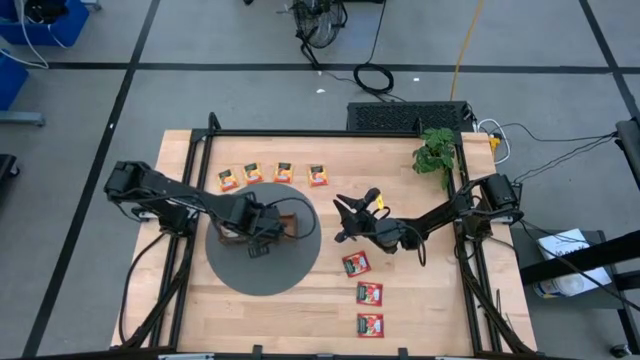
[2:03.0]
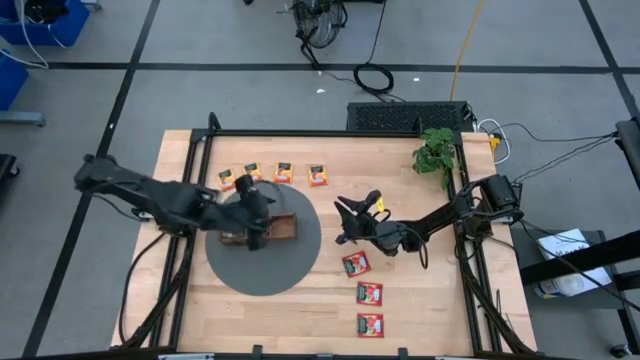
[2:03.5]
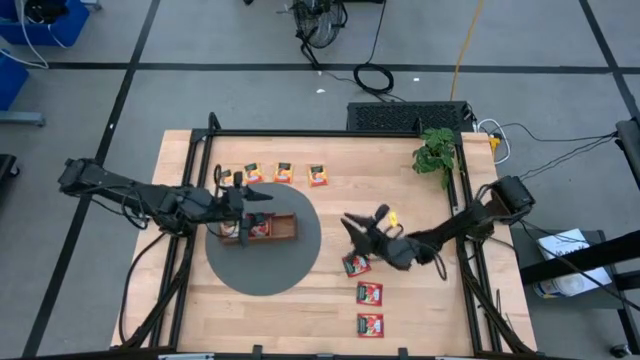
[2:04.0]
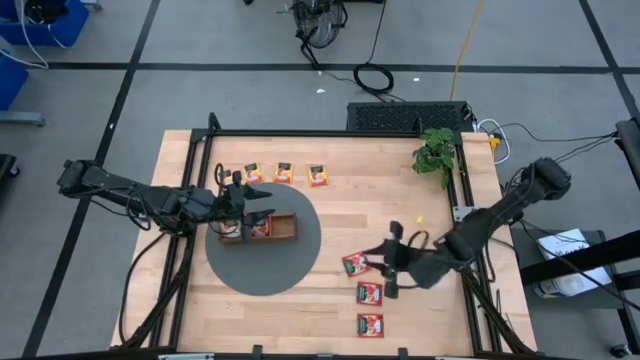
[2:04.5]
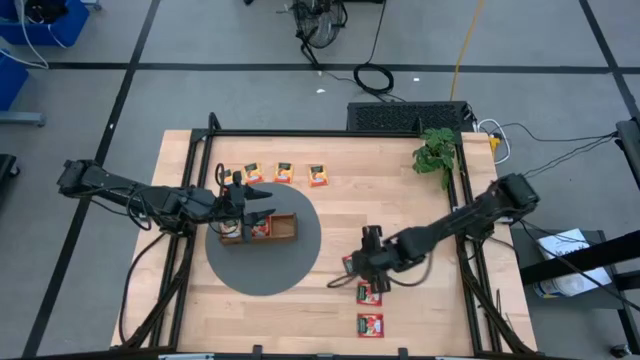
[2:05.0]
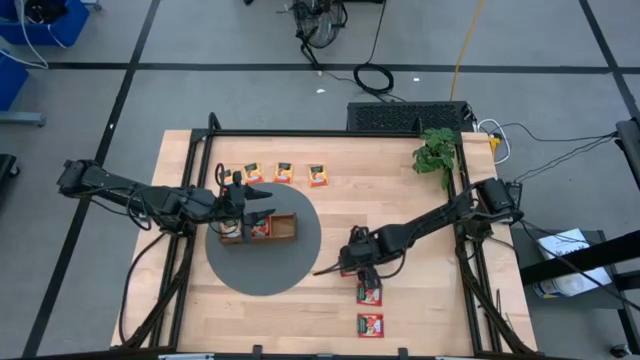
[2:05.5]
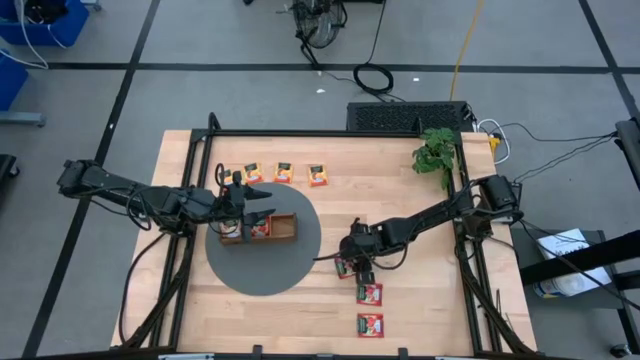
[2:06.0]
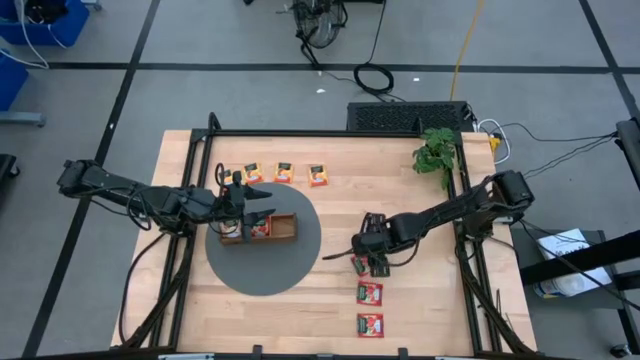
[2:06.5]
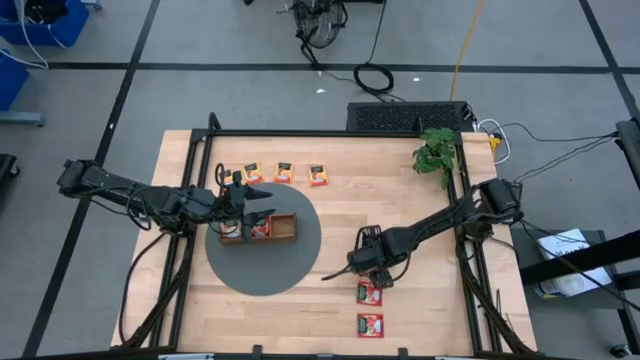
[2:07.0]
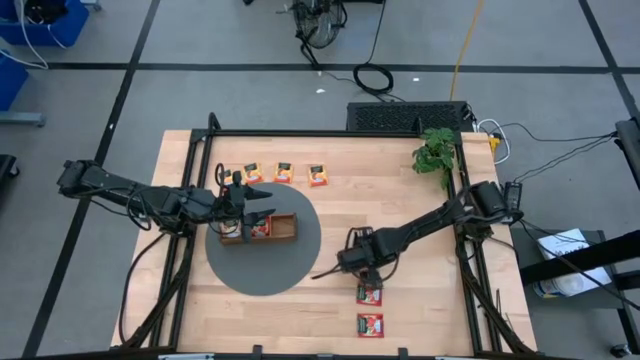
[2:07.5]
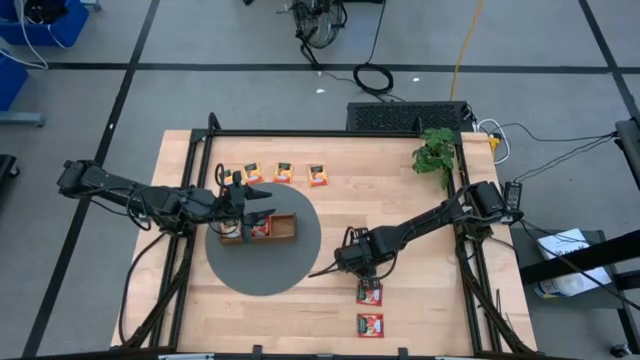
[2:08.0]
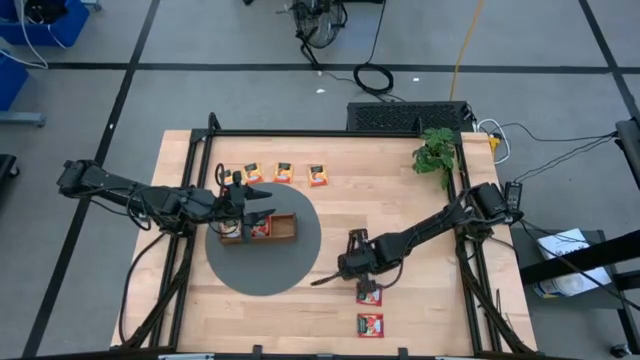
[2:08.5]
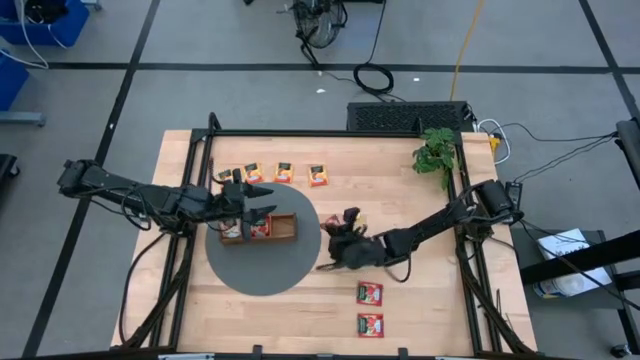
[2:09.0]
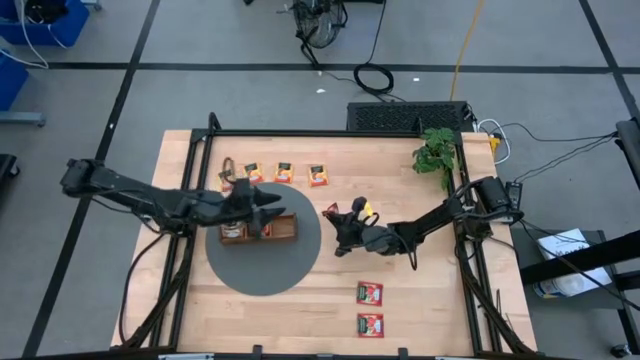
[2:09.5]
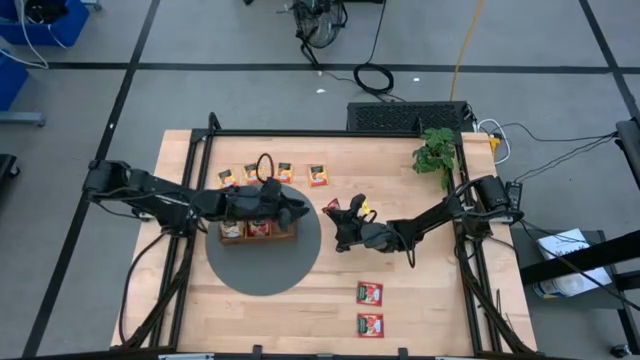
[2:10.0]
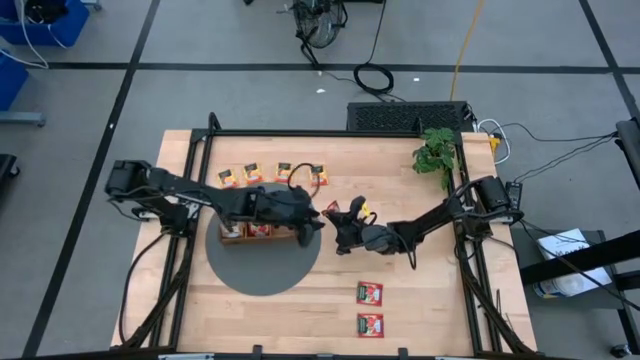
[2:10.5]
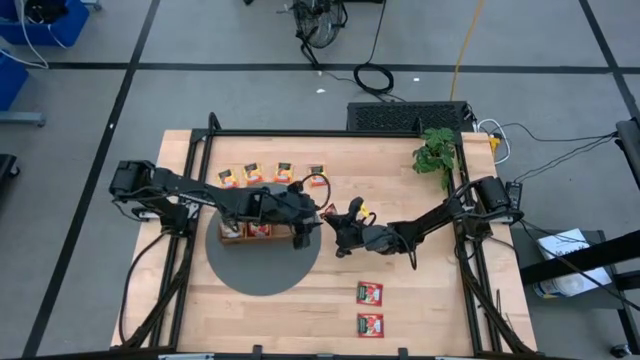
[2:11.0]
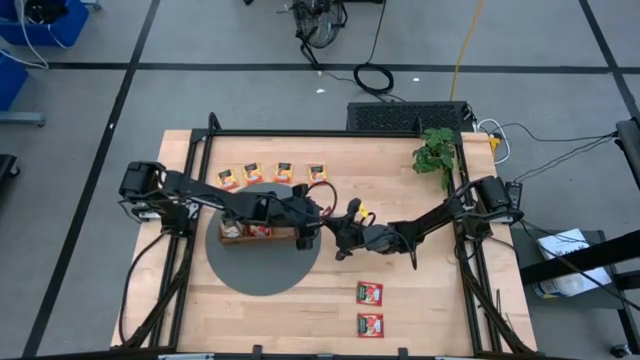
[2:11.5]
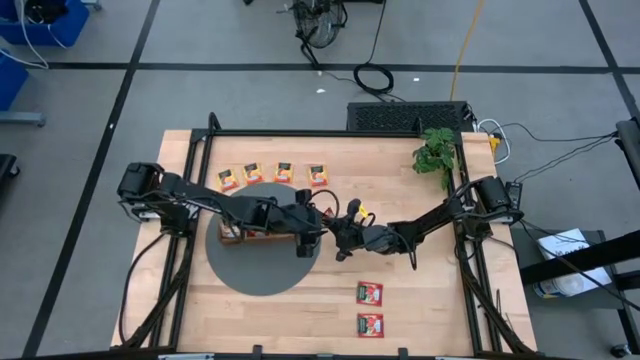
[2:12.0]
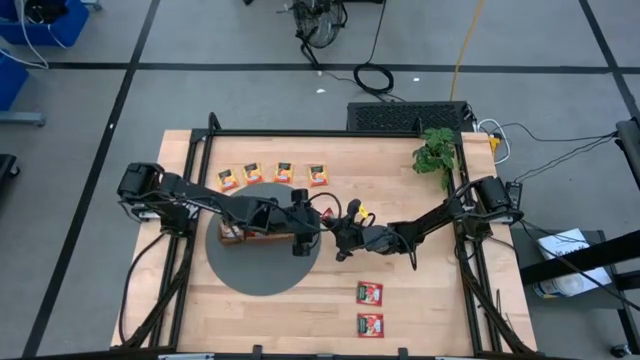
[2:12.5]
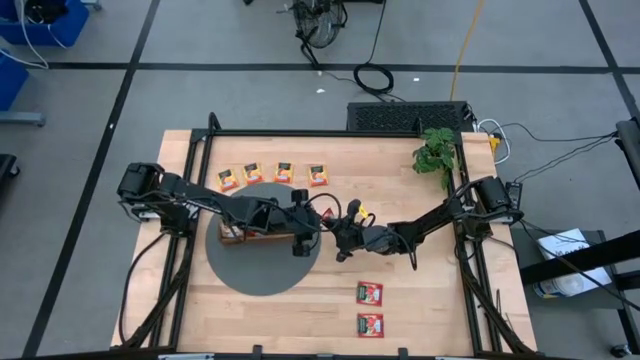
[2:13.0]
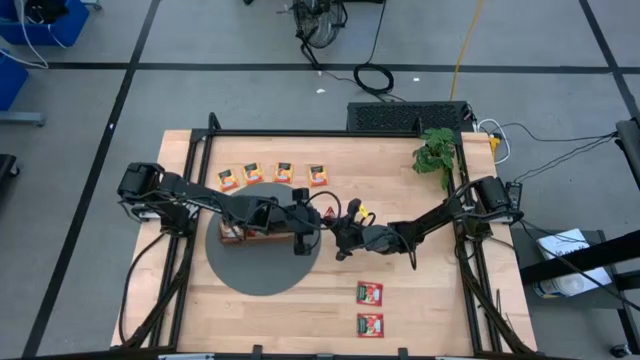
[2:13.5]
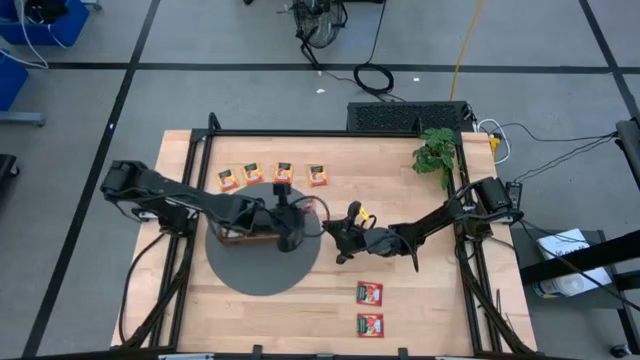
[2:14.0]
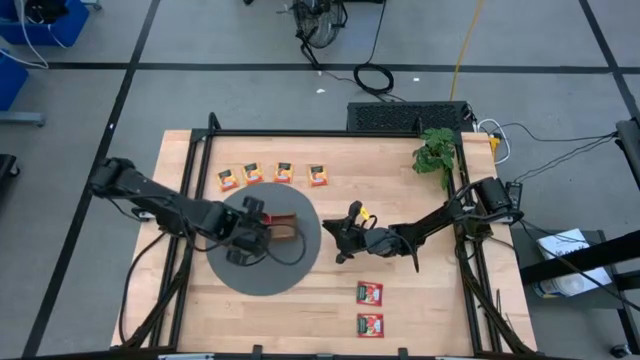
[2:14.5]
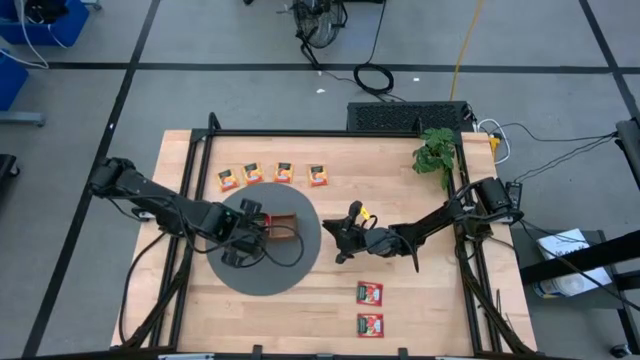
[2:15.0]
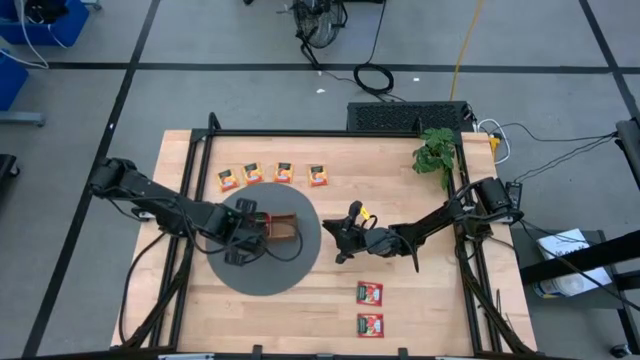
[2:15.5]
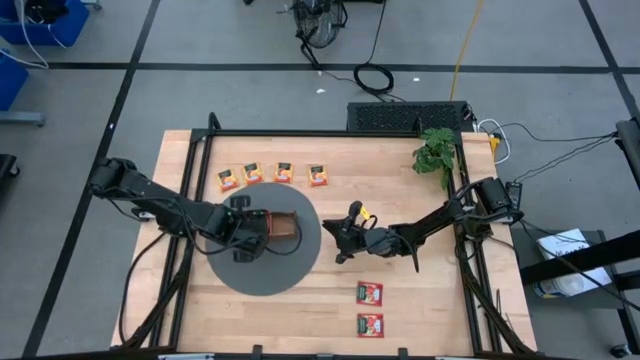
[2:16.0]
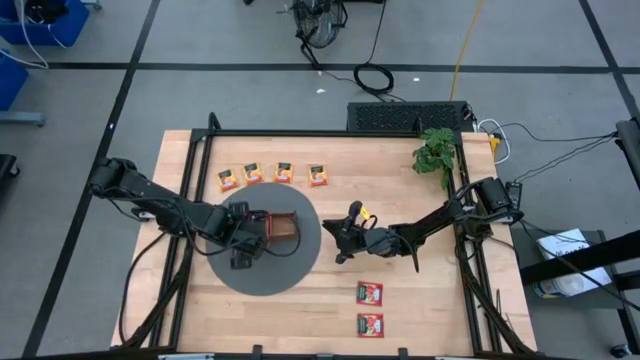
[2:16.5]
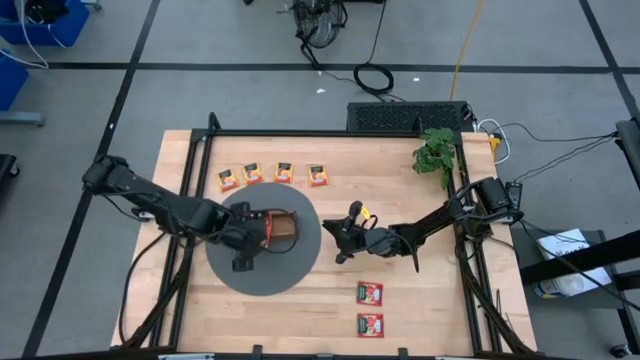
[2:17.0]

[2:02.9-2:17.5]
Task: Pick & Place Tea
Put the red tea bag into the middle section of the wooden organizer

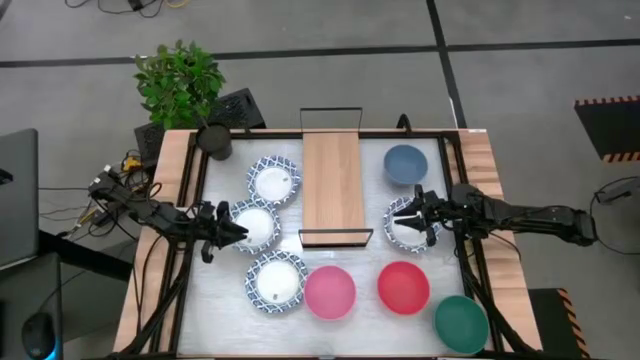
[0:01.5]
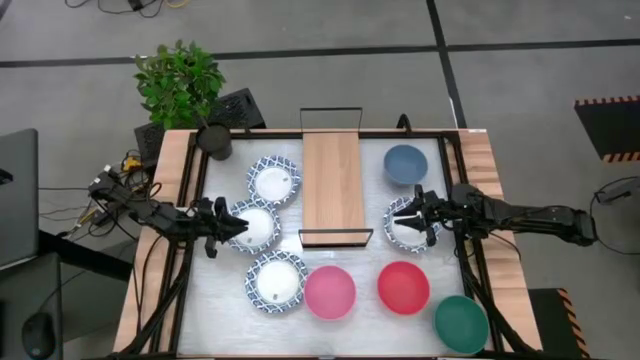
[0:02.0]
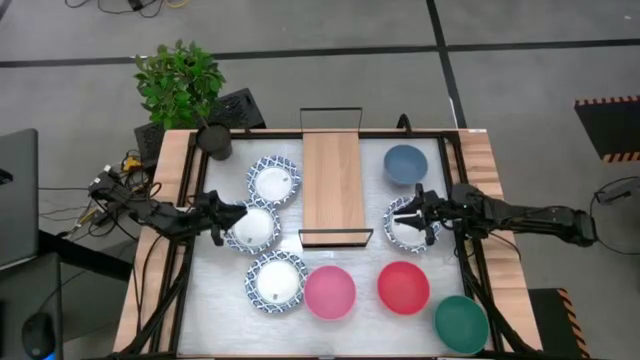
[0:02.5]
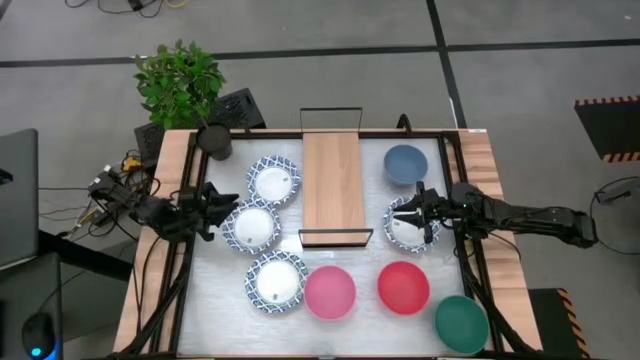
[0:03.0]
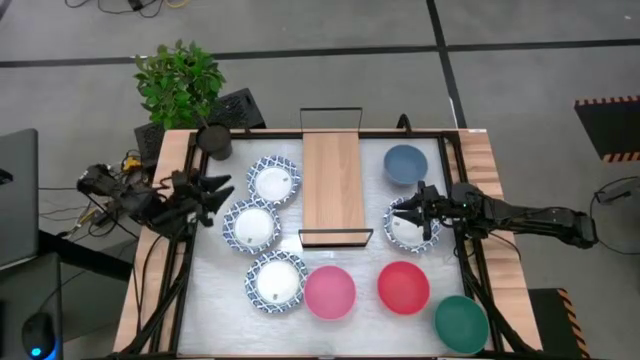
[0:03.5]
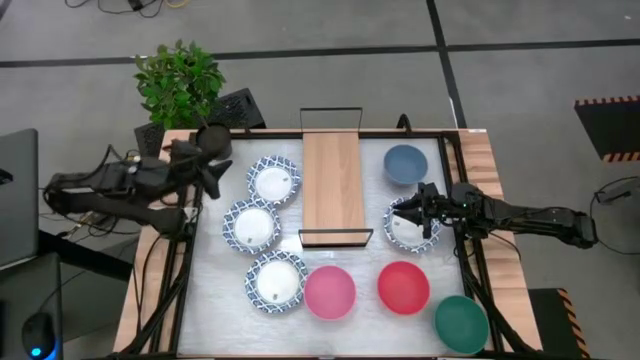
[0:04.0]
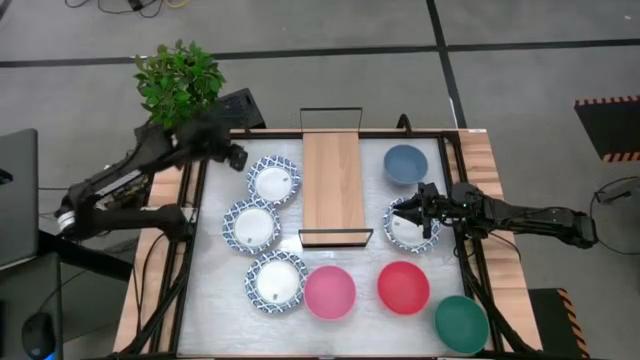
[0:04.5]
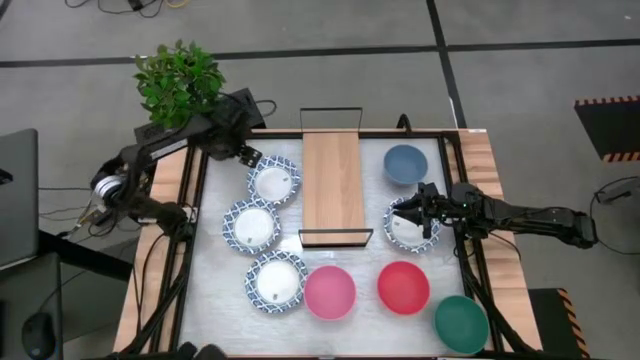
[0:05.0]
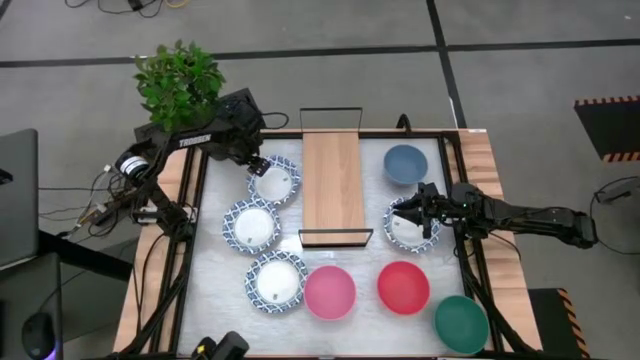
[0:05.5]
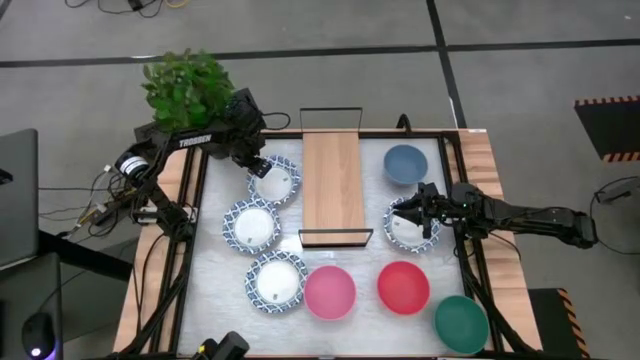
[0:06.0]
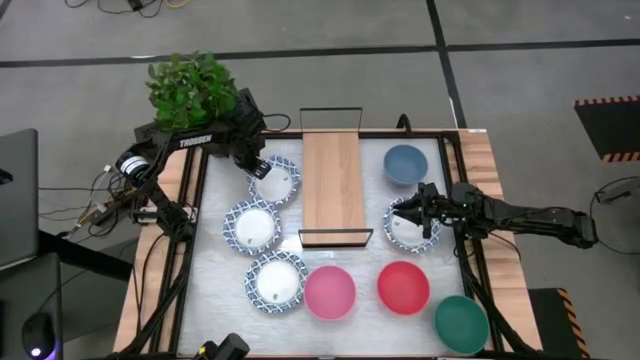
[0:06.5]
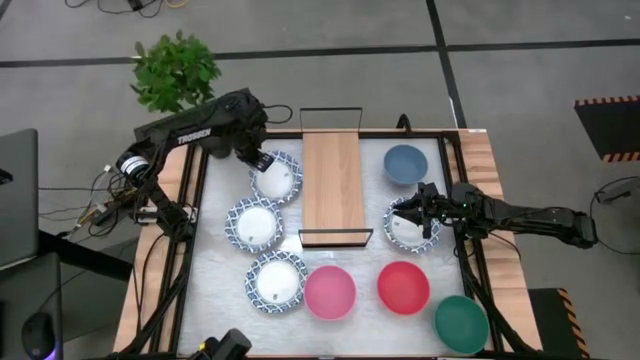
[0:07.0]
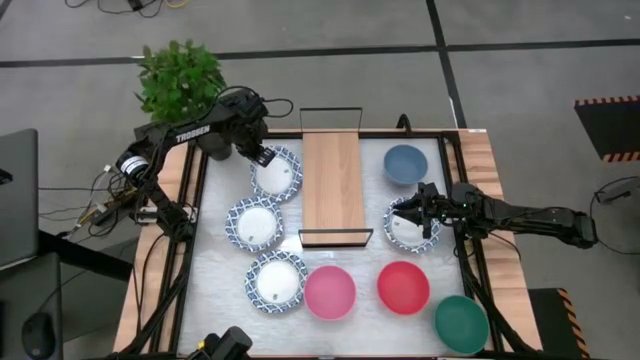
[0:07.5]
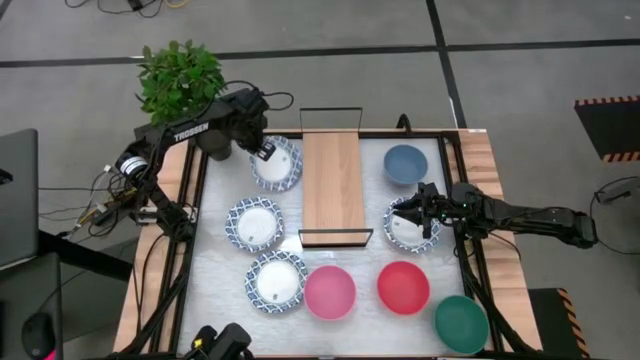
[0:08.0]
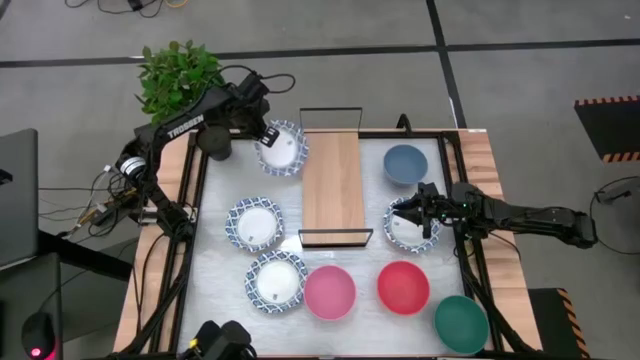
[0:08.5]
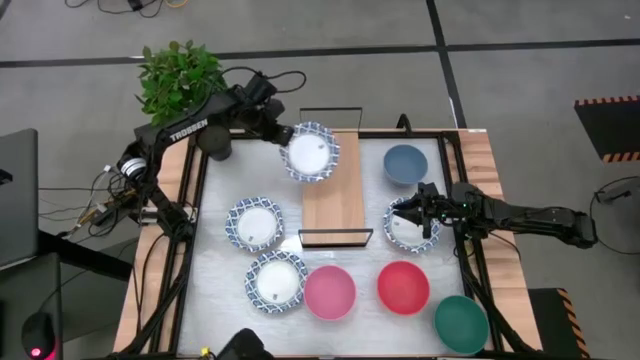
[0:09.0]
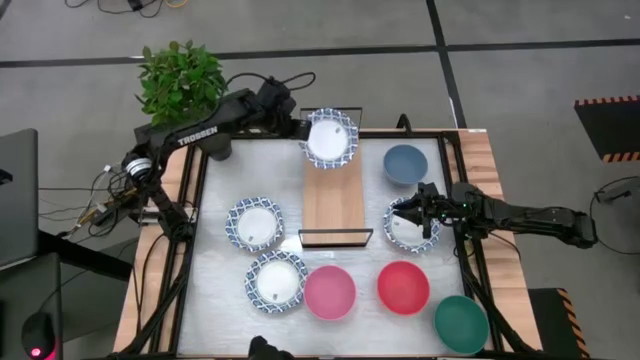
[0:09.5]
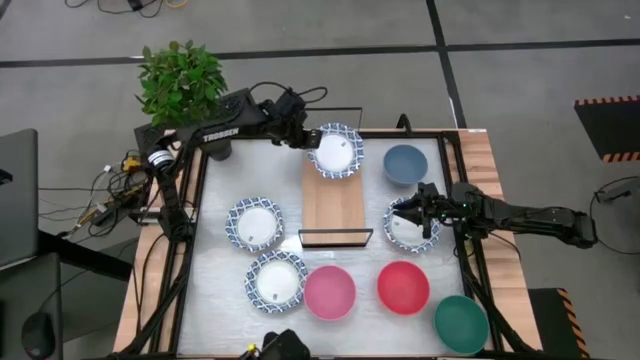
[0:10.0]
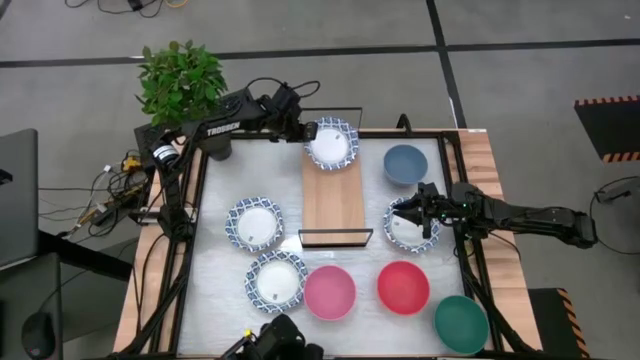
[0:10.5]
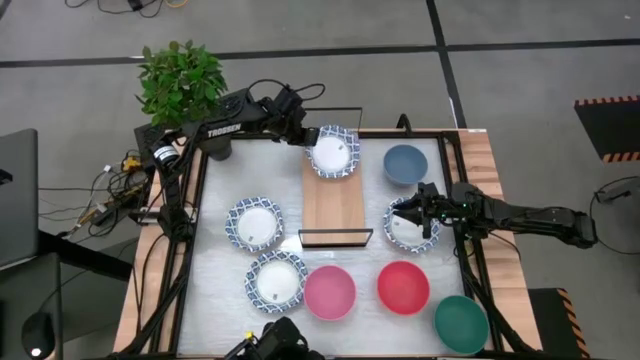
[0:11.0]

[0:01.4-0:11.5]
Task: Place and stack bowls onto a shelf
Put the blue patterned bowl on the shelf
